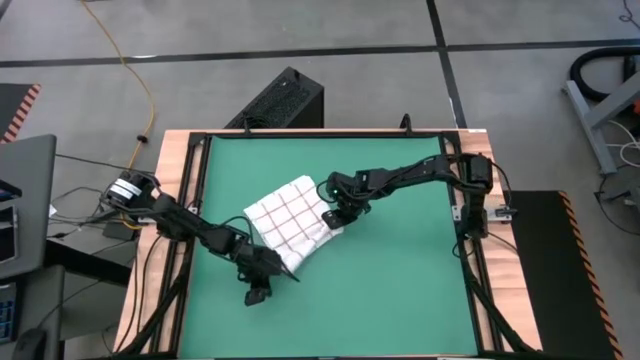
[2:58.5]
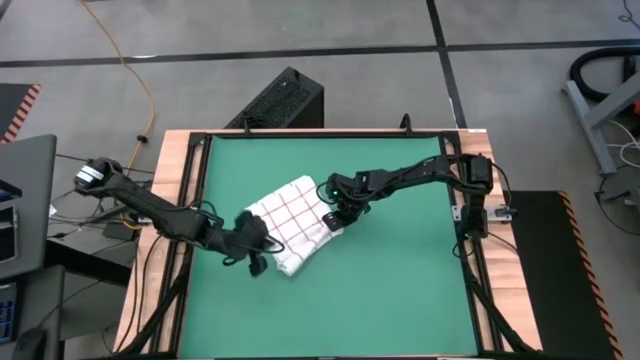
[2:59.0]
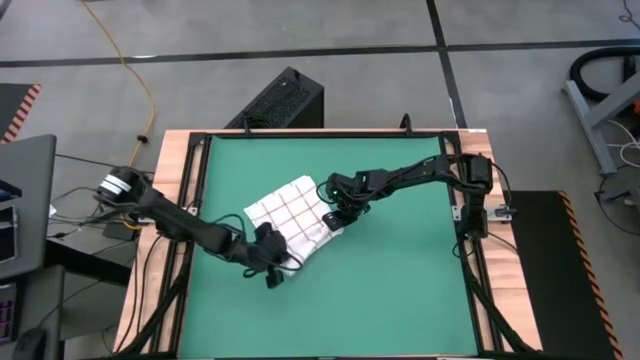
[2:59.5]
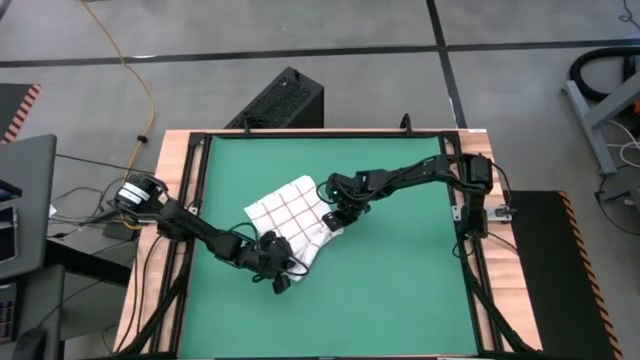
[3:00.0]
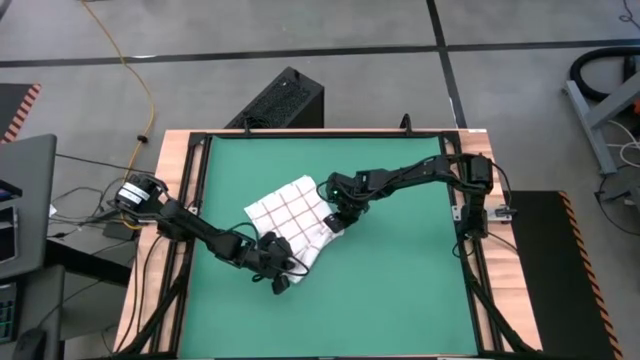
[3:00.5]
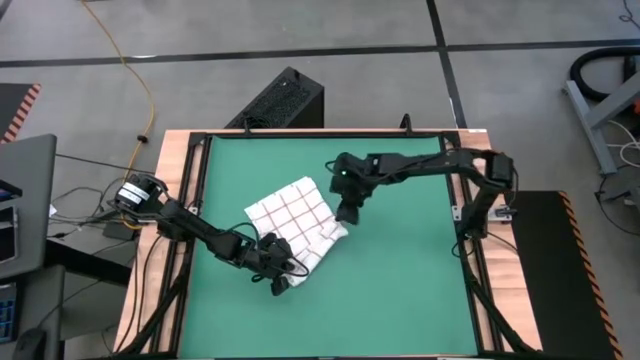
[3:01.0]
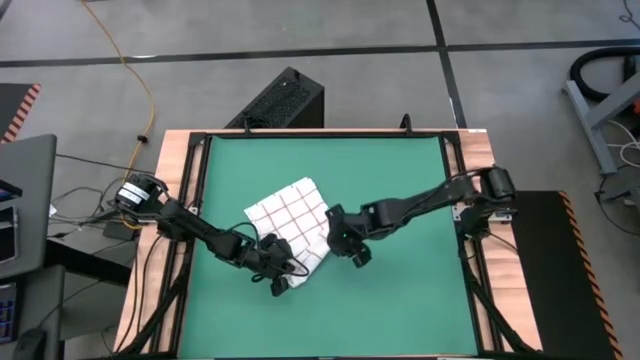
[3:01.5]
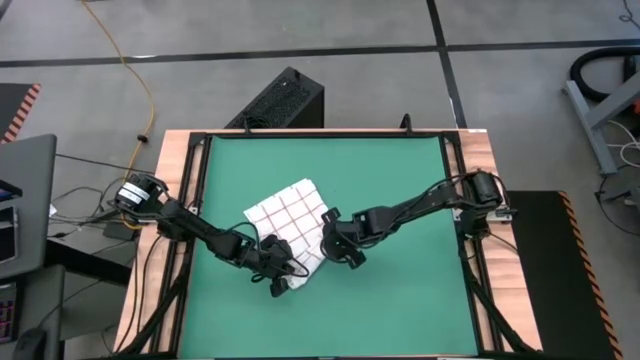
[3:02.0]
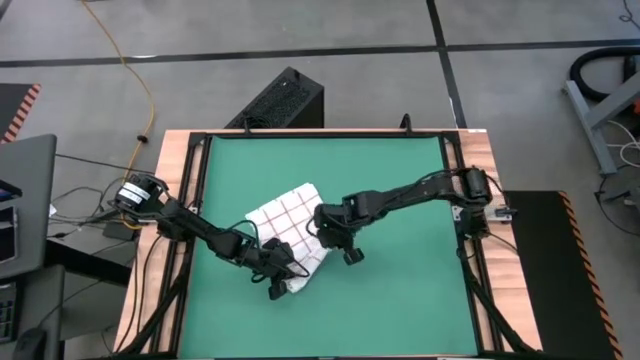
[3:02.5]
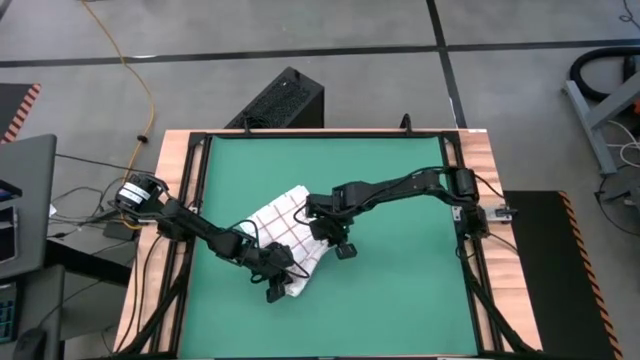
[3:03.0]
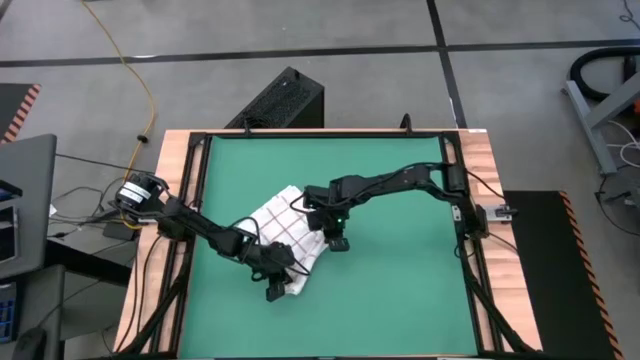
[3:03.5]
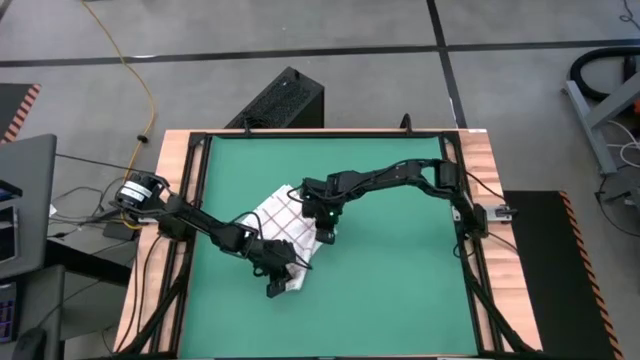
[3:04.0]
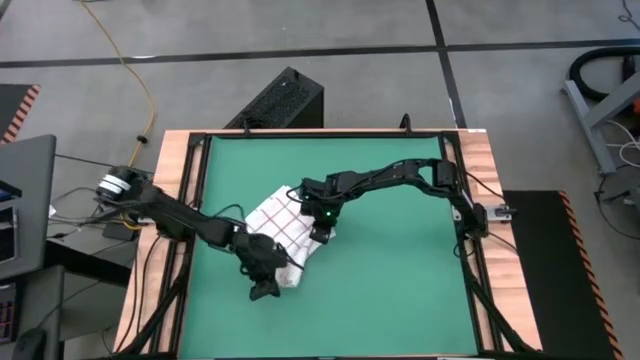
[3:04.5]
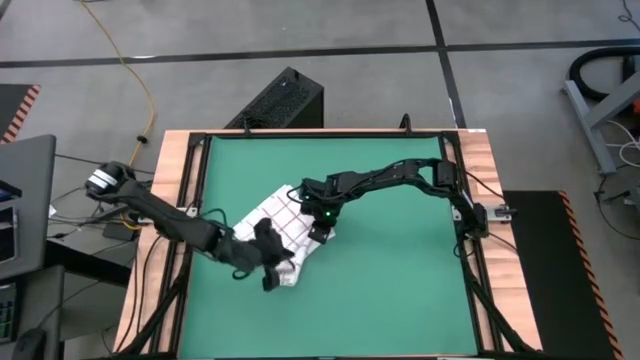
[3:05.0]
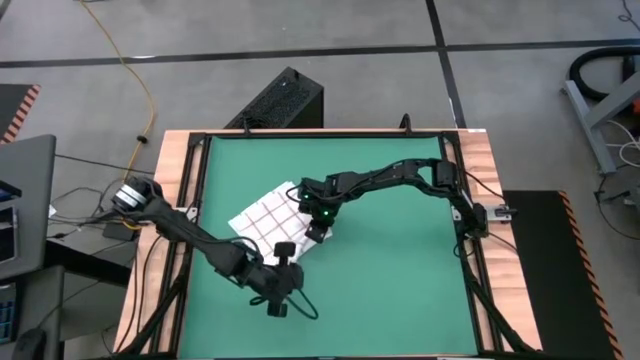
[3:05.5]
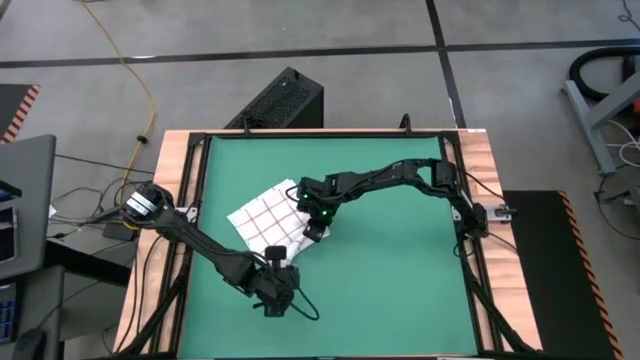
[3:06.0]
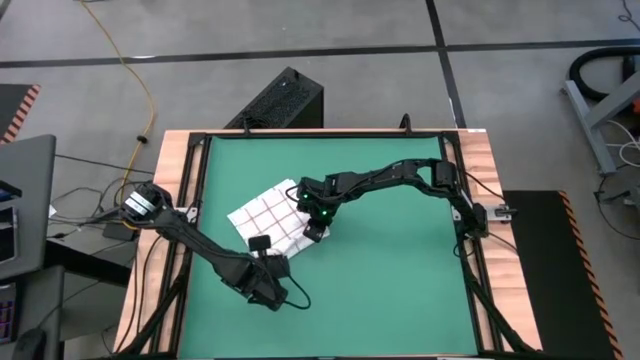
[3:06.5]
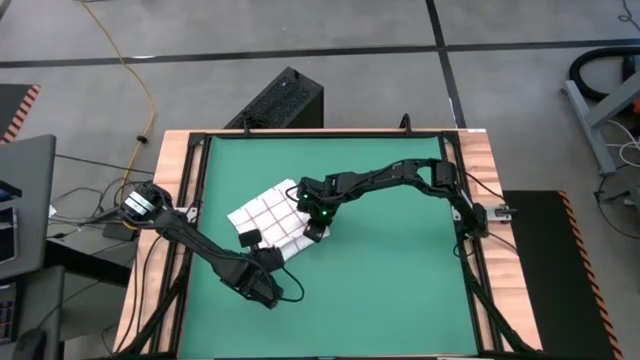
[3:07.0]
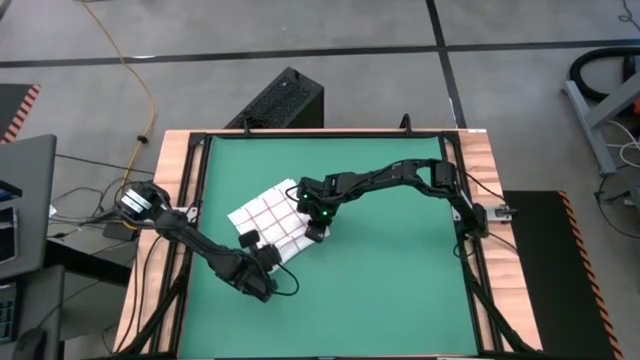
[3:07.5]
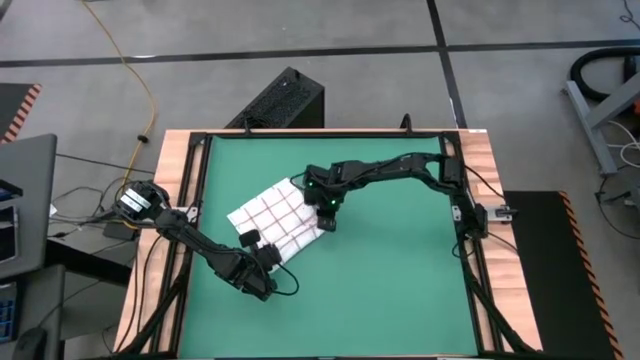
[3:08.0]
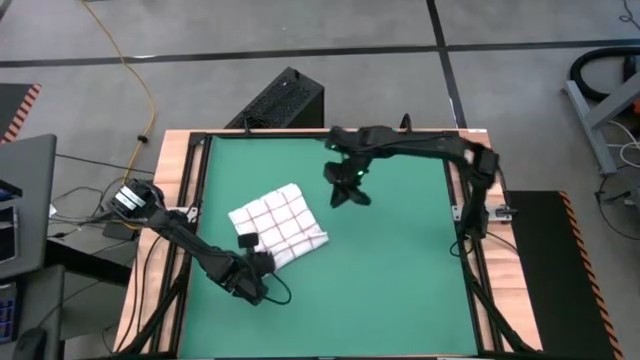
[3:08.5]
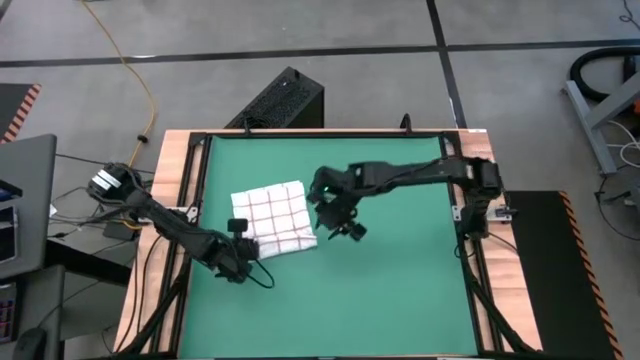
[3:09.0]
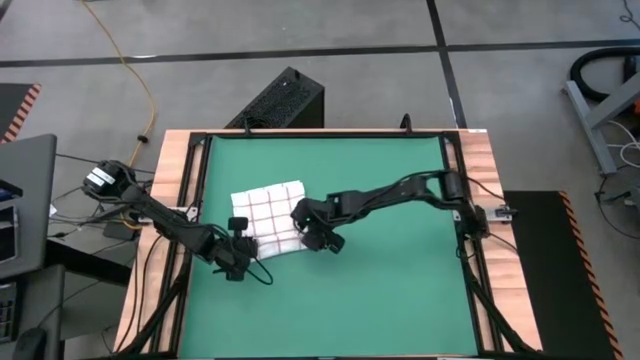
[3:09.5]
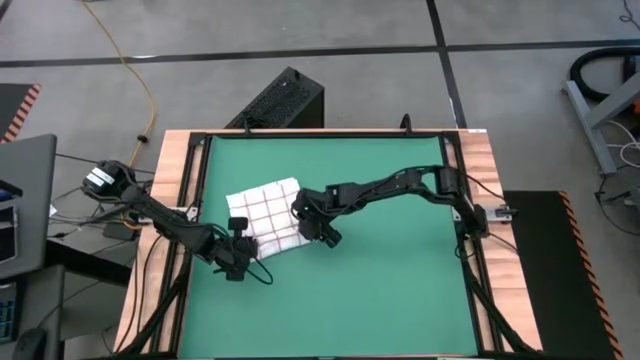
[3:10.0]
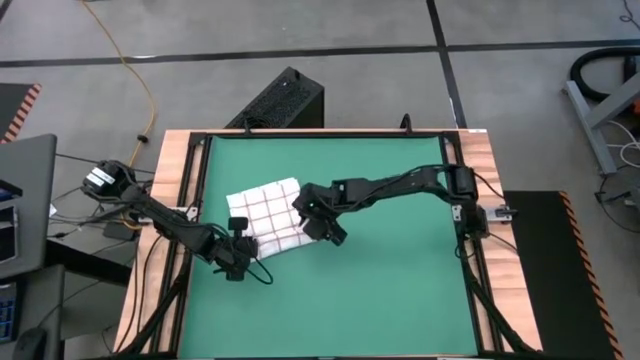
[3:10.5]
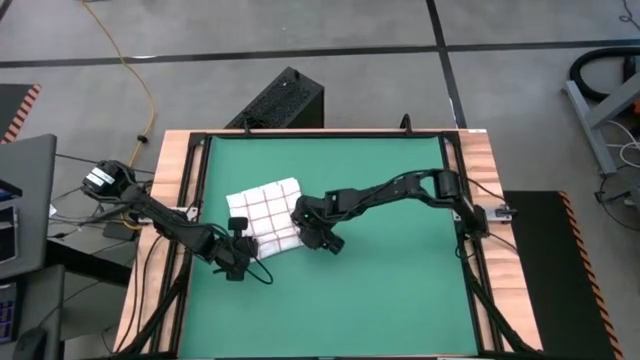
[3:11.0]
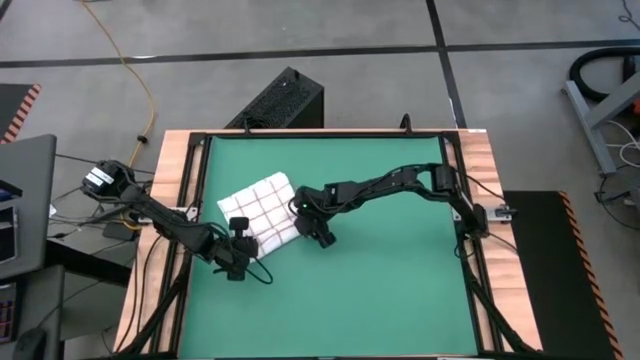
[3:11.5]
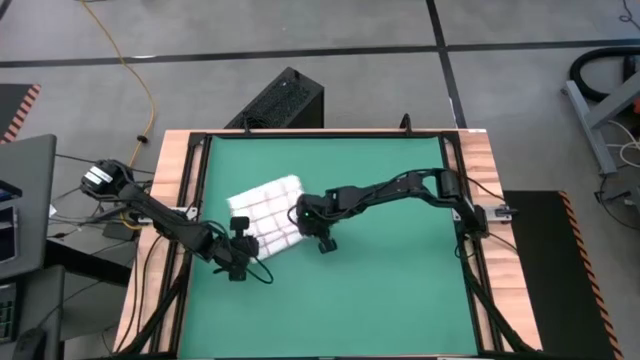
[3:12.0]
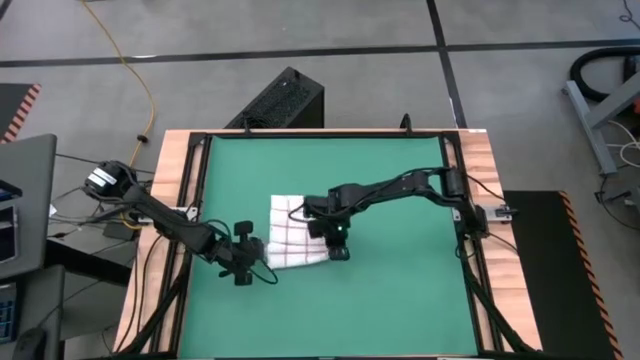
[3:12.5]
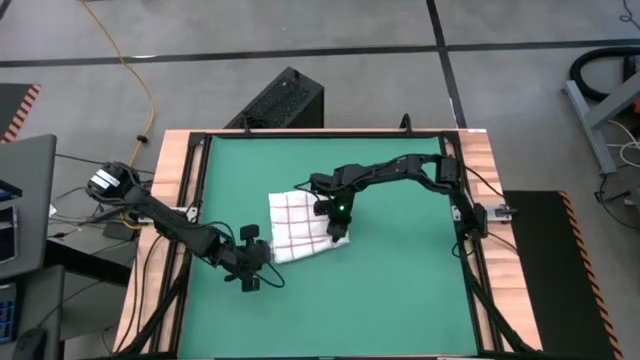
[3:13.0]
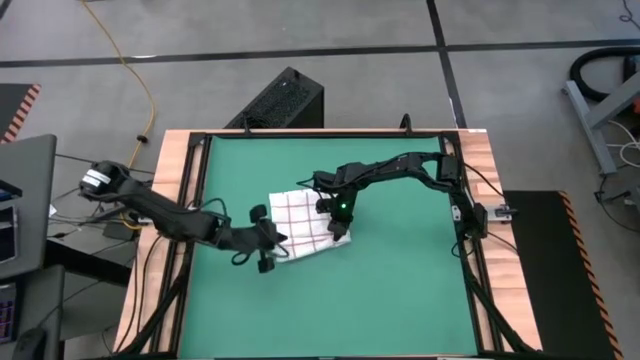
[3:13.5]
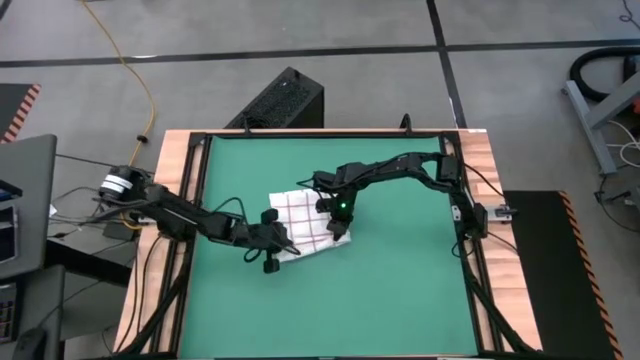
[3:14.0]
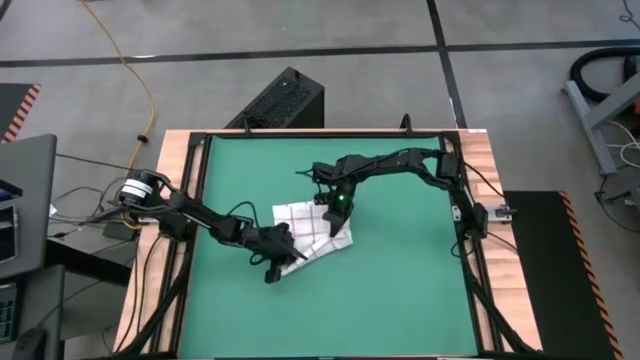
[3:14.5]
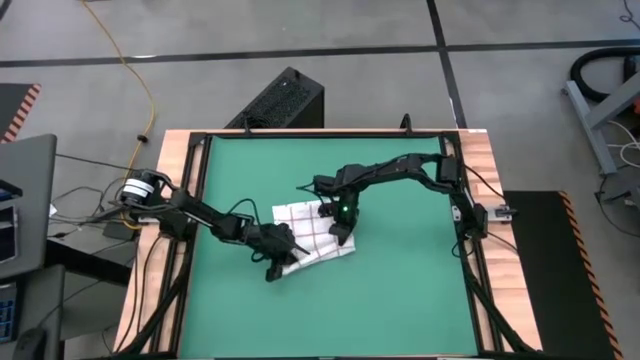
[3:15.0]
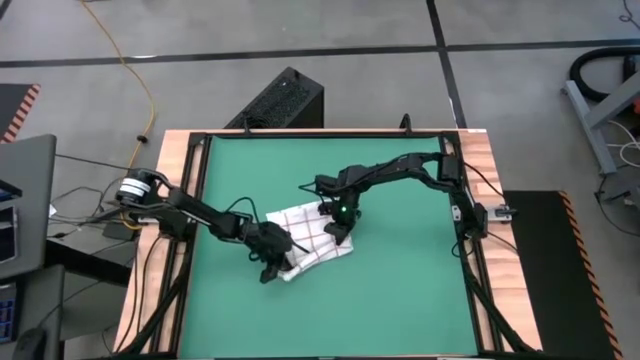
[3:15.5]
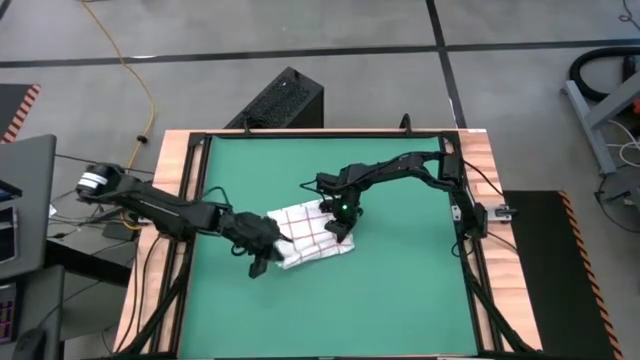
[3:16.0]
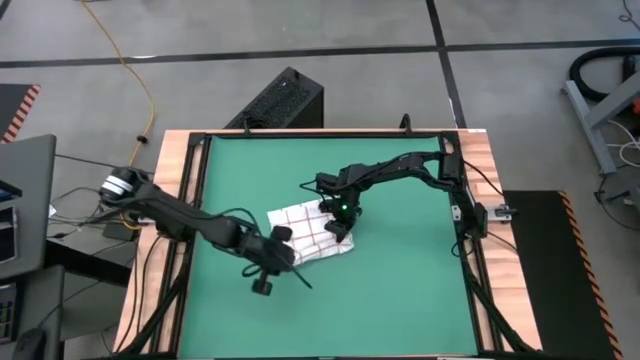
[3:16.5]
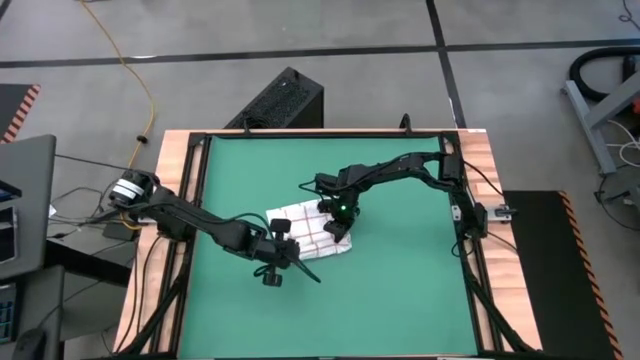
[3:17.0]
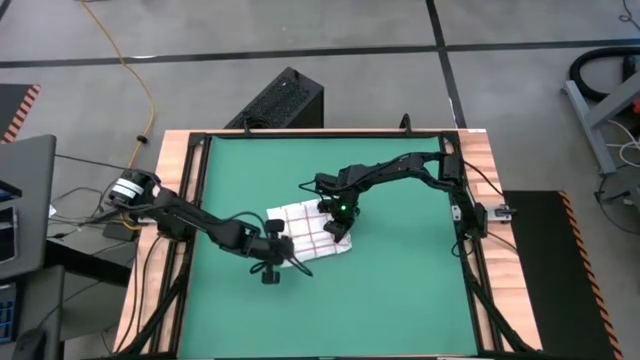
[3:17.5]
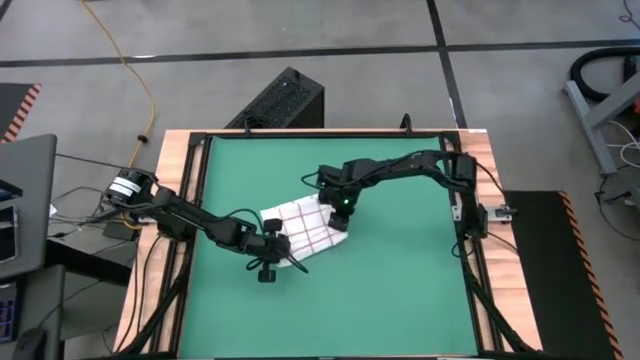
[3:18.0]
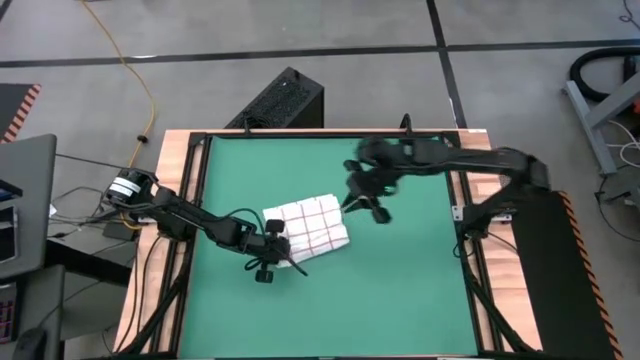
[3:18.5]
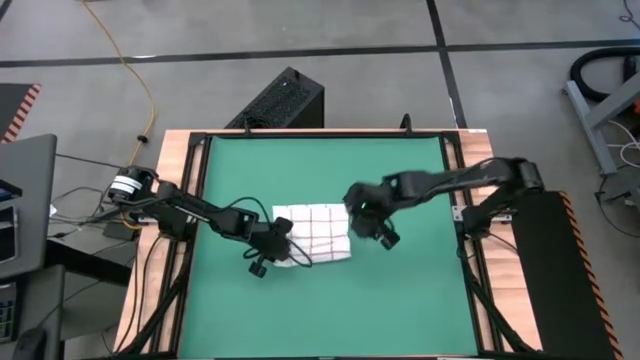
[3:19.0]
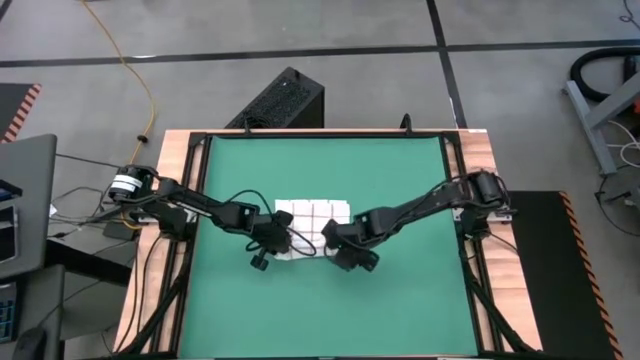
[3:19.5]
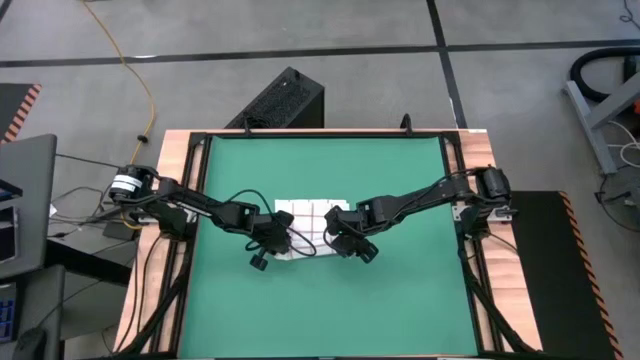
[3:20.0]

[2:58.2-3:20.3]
Task: Roll towel into tight, uniform cylinder
Roll the white patterned towel
